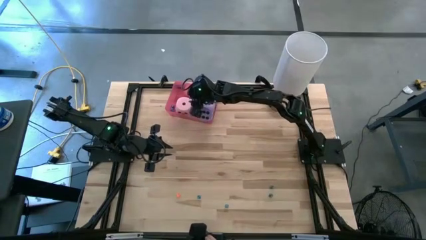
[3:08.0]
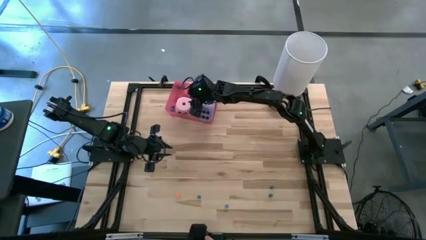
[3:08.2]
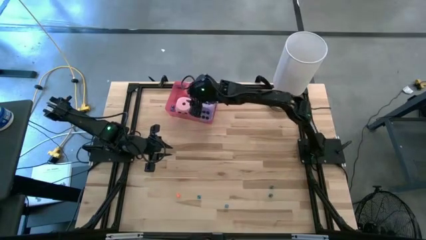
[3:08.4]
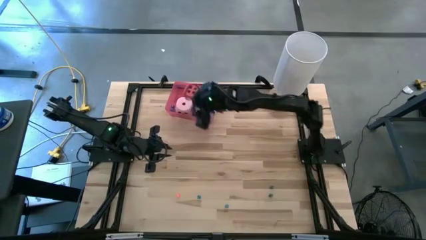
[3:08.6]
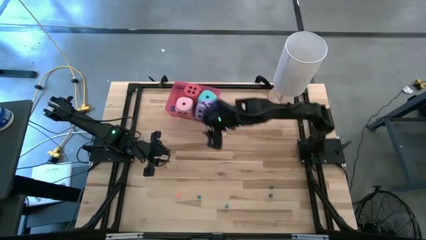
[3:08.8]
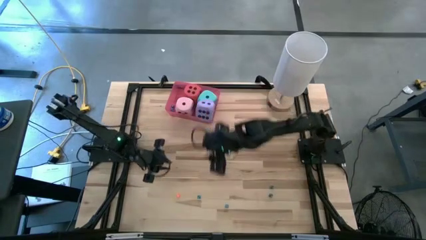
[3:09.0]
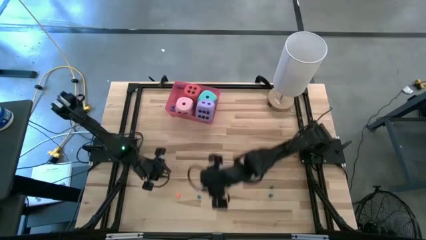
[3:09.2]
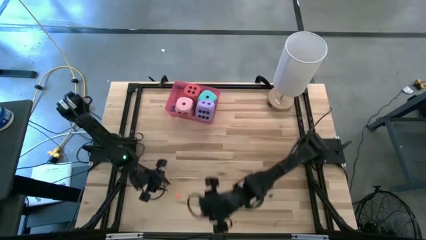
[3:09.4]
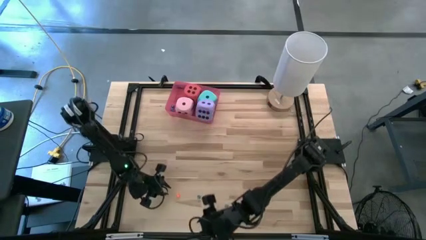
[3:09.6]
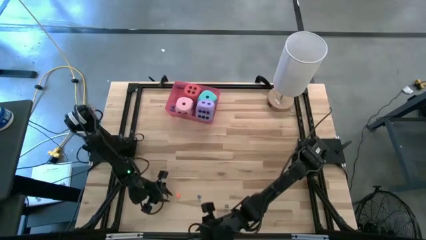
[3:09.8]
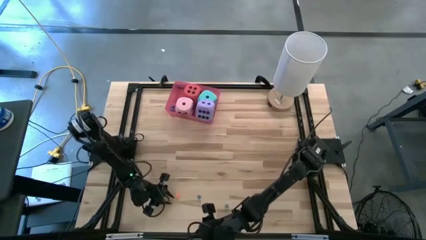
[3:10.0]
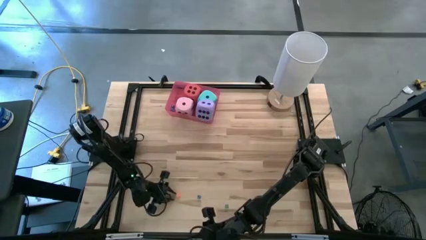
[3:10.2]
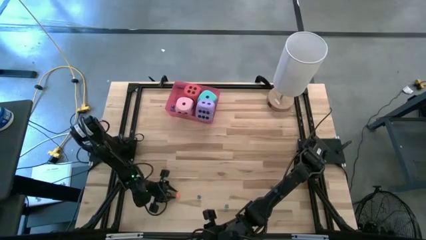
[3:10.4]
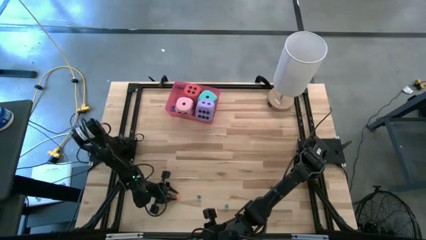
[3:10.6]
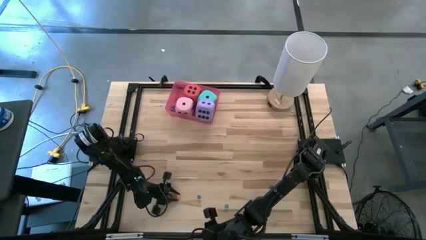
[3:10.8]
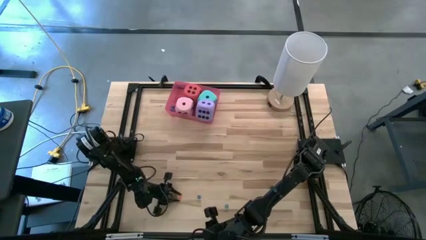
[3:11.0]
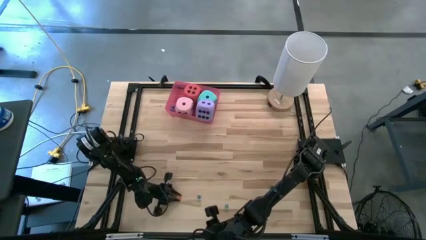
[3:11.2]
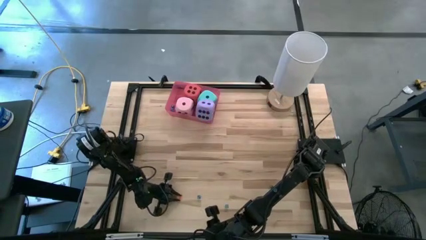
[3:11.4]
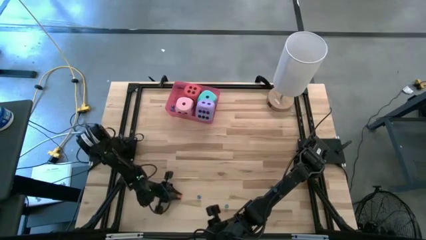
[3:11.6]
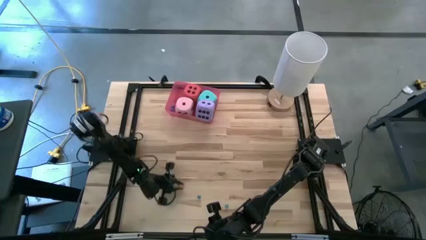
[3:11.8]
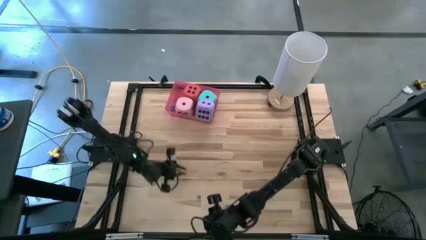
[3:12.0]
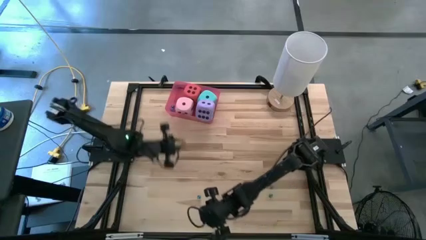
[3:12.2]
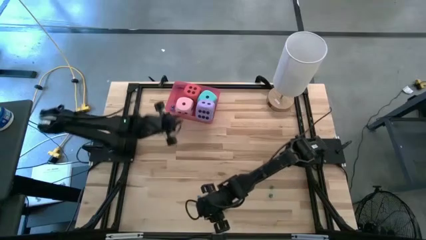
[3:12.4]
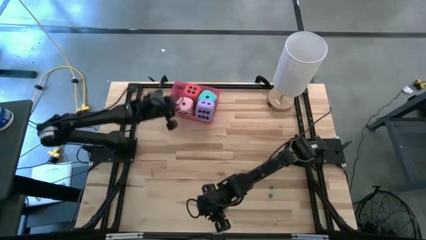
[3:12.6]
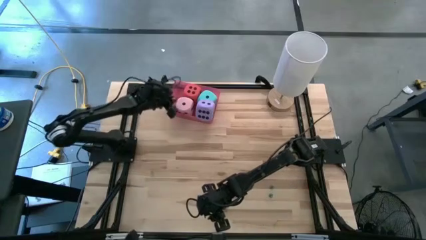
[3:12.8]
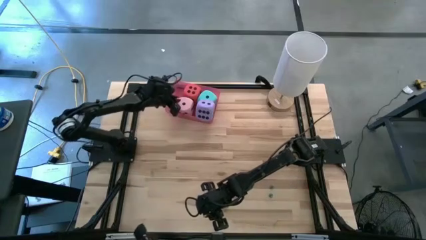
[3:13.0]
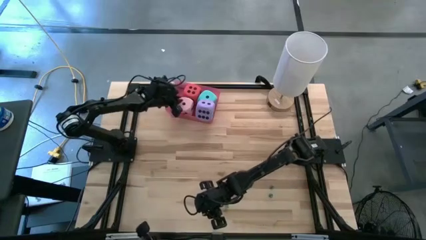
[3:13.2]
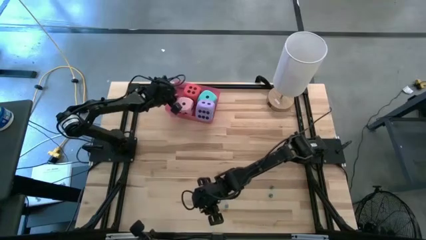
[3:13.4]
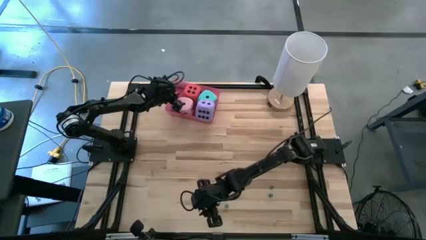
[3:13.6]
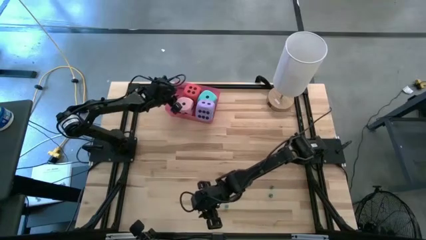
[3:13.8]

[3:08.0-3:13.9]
Task: Pick & Place Dice
Put the small orange dice into the pink bin

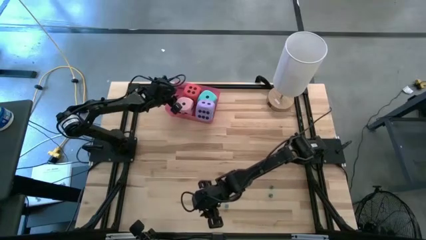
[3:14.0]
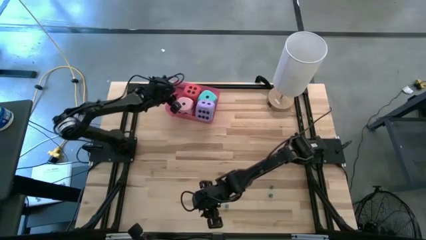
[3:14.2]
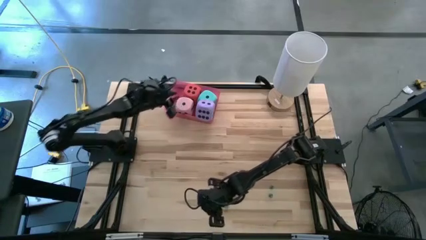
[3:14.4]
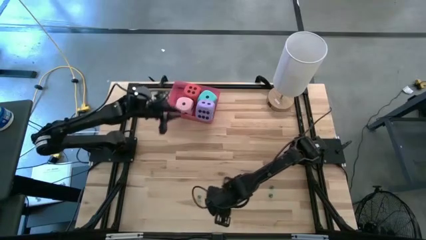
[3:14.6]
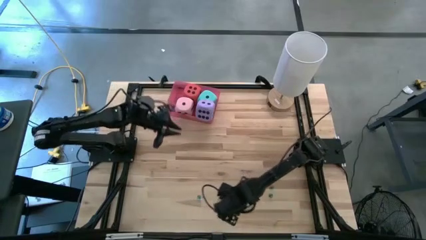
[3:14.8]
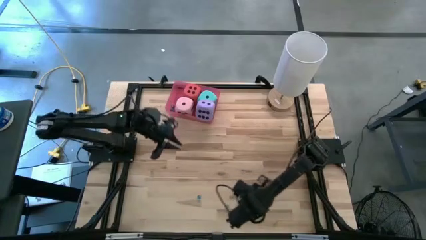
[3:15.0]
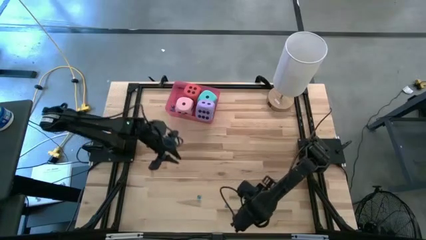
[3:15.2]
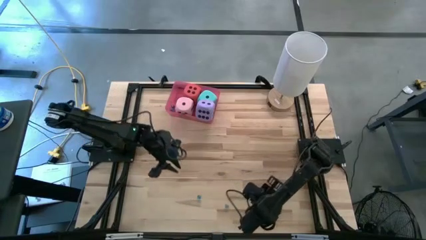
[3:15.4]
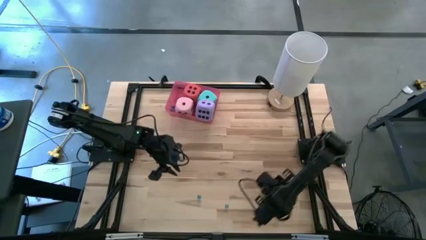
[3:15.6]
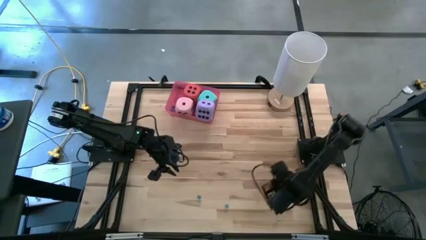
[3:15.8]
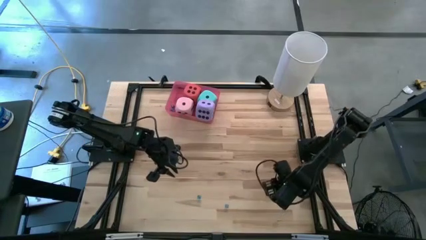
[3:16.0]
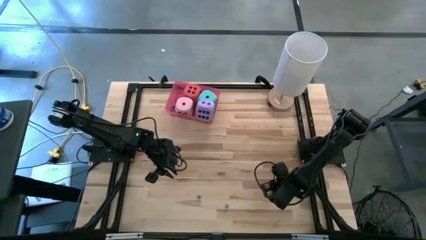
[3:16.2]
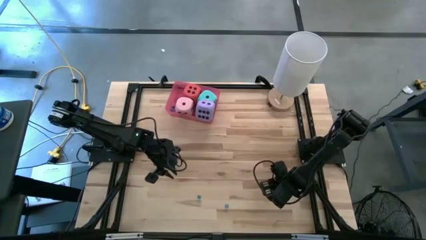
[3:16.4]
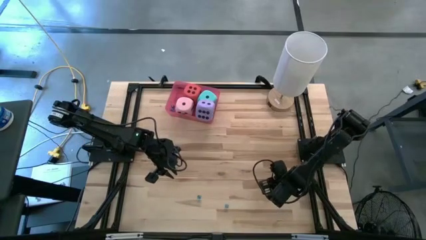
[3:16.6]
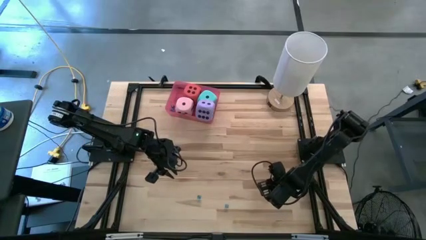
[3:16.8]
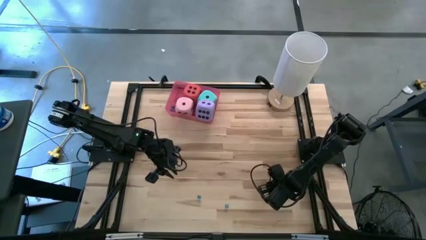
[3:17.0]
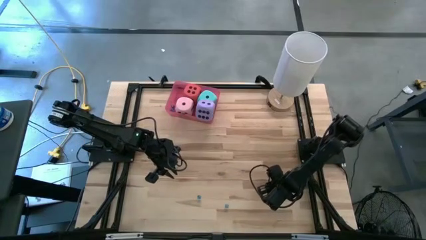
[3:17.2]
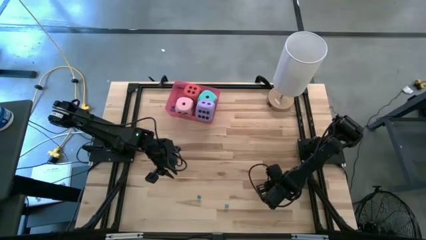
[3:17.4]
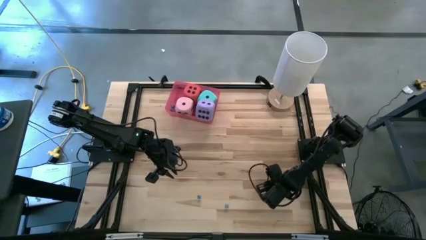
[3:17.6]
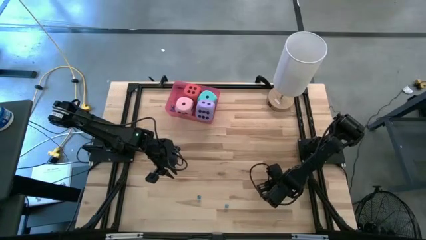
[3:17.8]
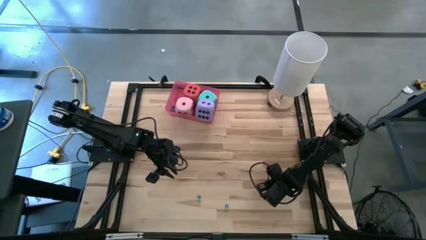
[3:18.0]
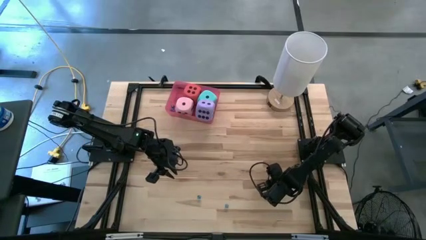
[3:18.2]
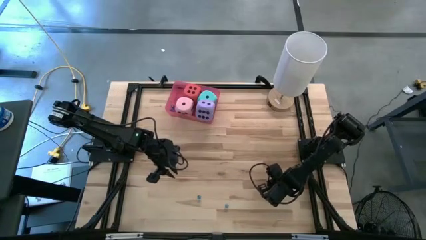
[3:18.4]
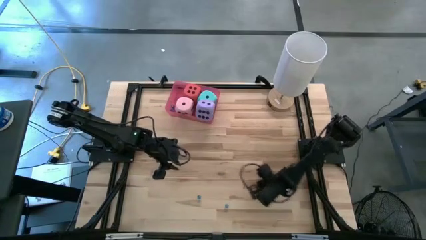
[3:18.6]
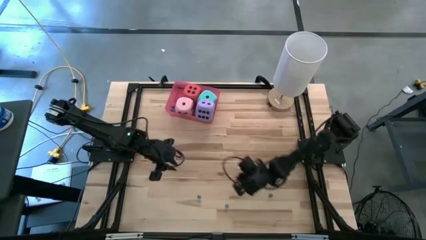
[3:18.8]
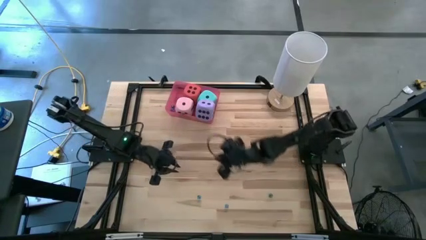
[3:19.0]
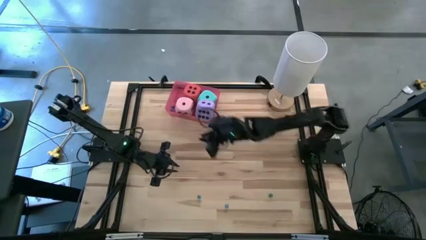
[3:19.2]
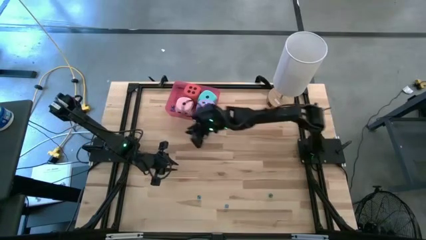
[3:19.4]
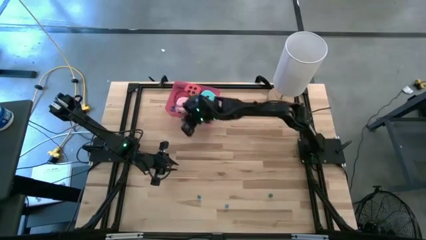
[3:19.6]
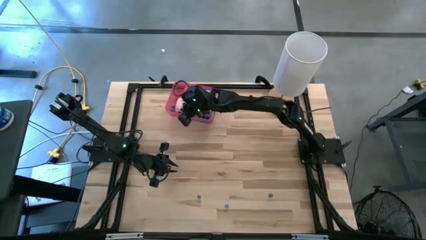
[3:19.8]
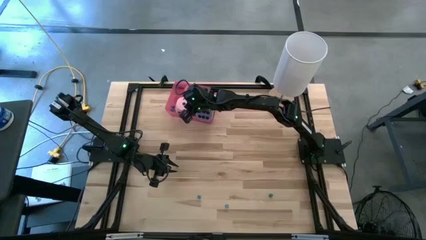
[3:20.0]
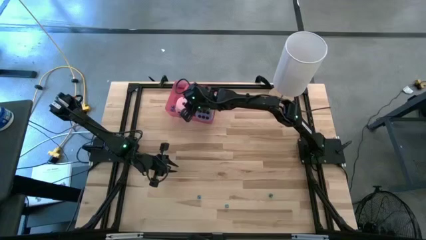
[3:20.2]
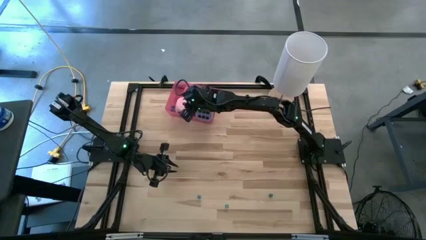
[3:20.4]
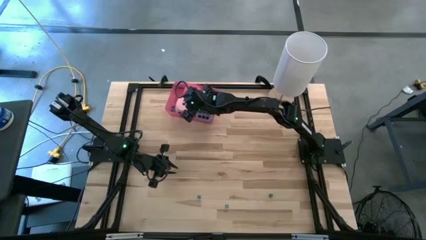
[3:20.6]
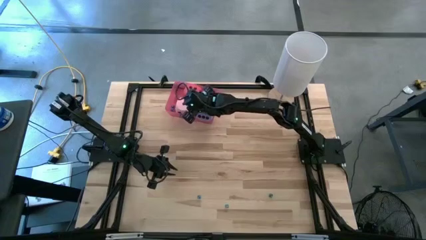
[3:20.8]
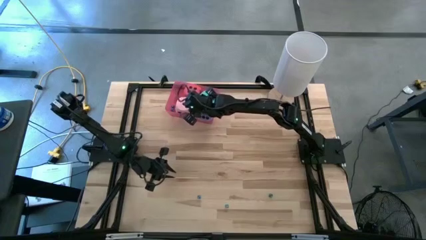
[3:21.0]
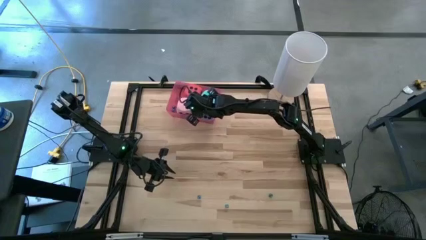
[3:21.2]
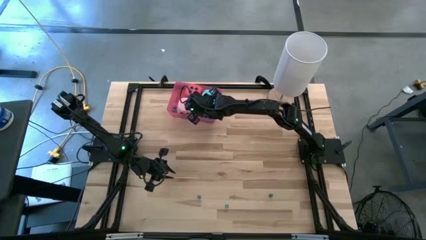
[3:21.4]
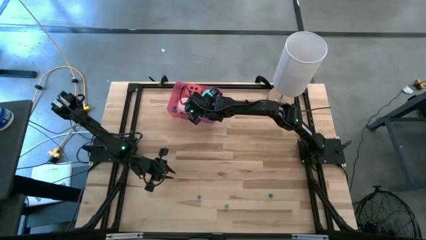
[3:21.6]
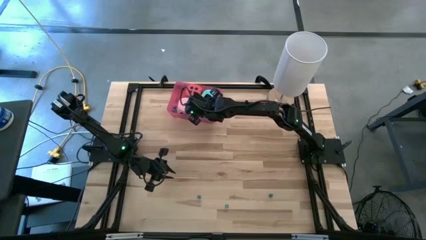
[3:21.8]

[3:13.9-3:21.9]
Put the small green dice into the pink bin
